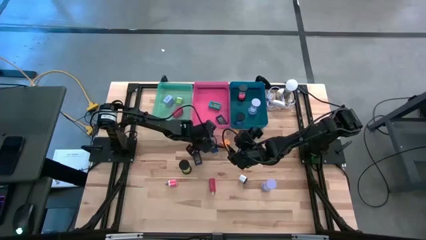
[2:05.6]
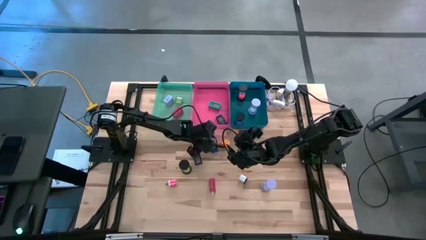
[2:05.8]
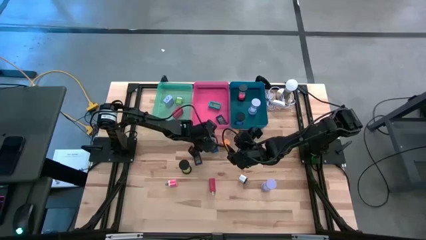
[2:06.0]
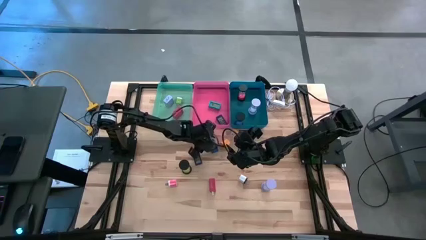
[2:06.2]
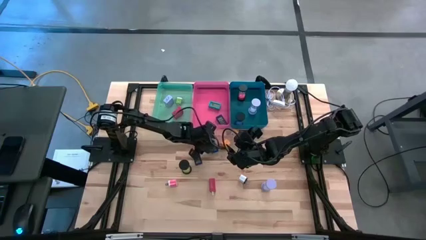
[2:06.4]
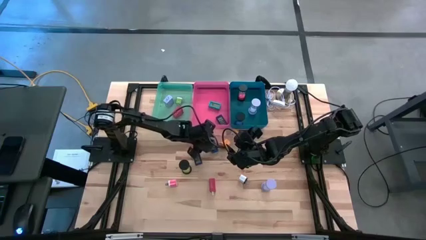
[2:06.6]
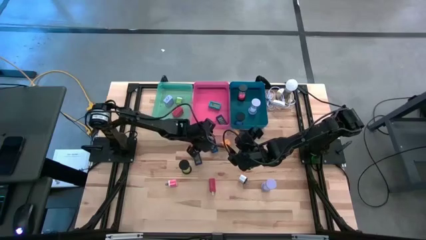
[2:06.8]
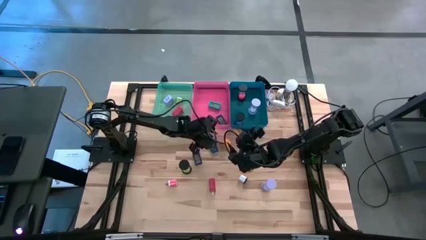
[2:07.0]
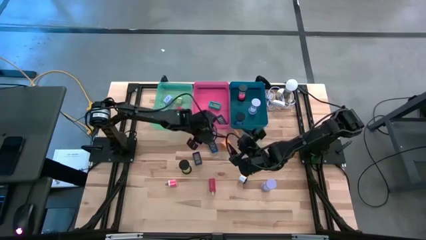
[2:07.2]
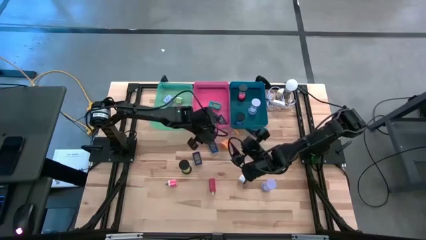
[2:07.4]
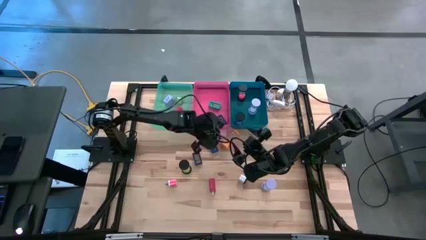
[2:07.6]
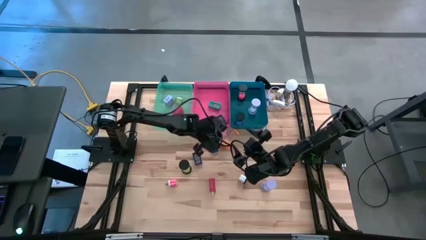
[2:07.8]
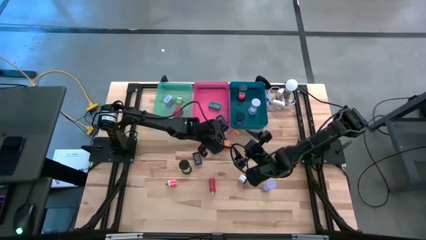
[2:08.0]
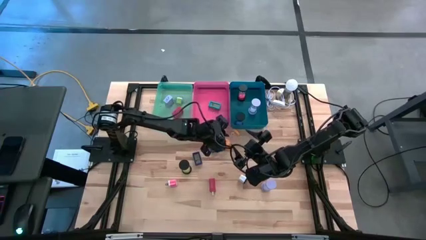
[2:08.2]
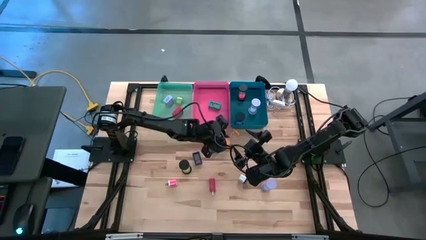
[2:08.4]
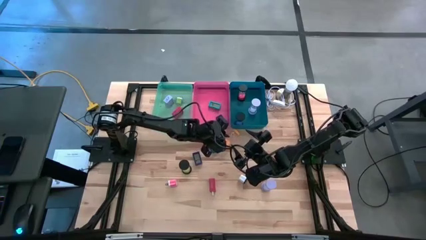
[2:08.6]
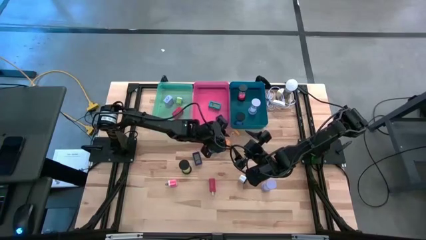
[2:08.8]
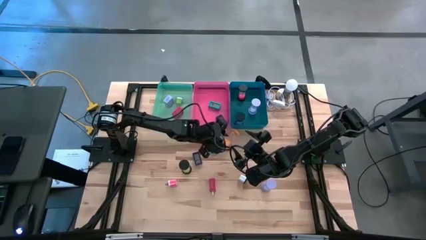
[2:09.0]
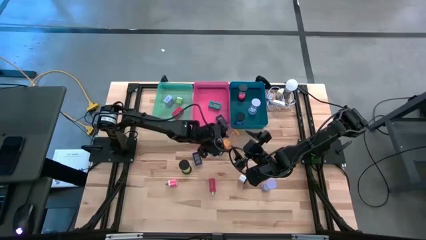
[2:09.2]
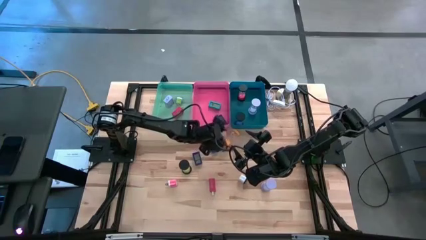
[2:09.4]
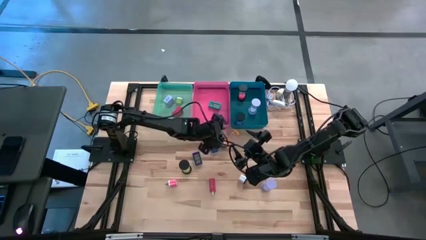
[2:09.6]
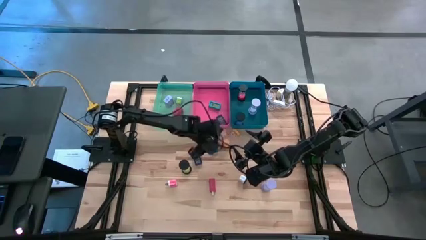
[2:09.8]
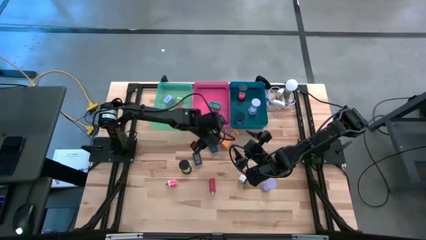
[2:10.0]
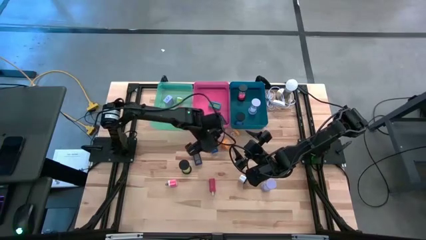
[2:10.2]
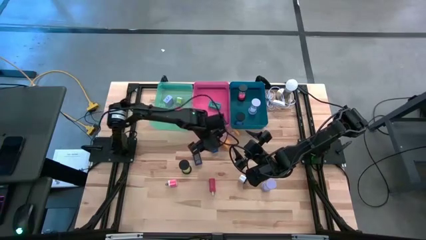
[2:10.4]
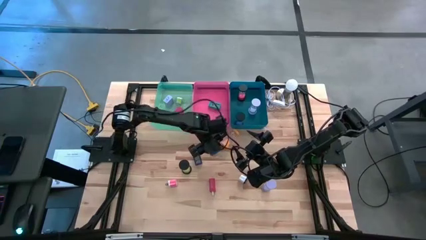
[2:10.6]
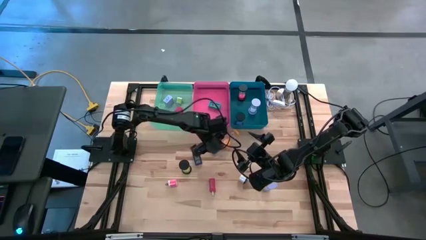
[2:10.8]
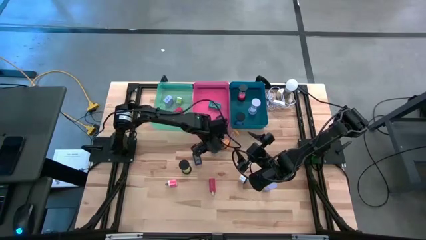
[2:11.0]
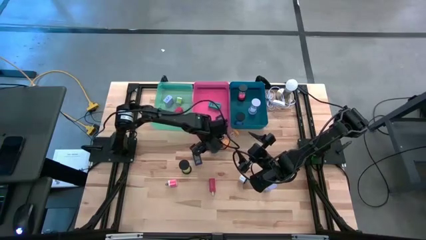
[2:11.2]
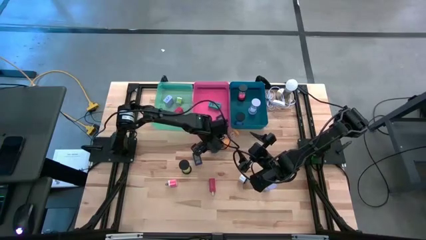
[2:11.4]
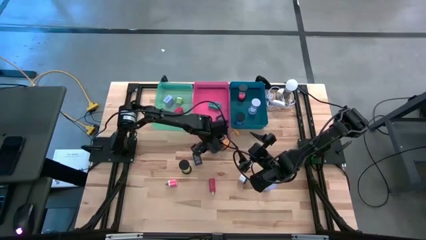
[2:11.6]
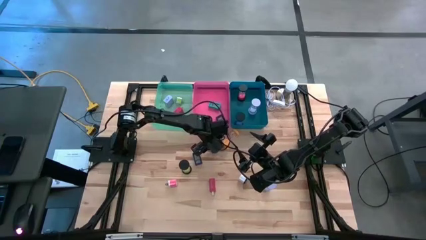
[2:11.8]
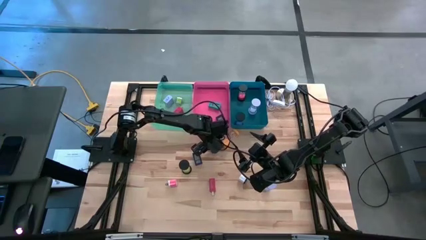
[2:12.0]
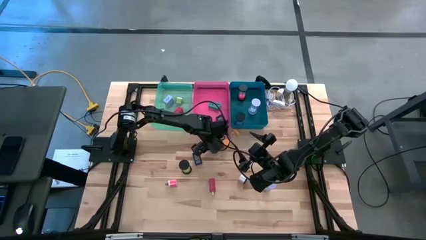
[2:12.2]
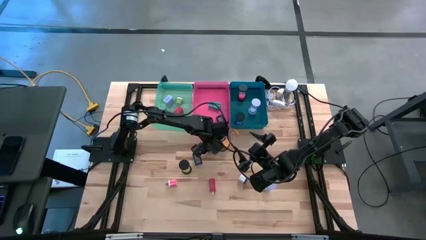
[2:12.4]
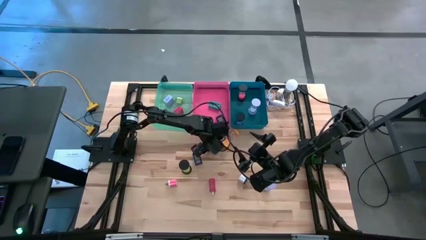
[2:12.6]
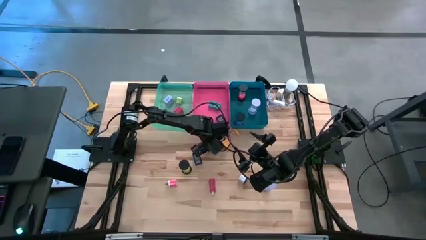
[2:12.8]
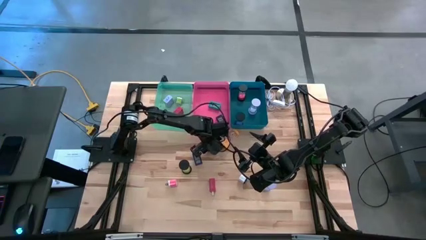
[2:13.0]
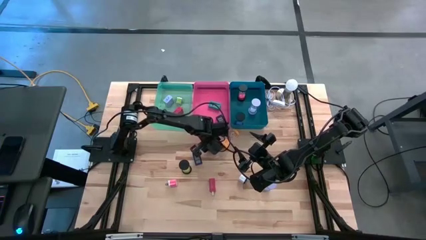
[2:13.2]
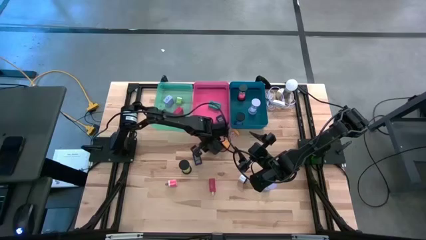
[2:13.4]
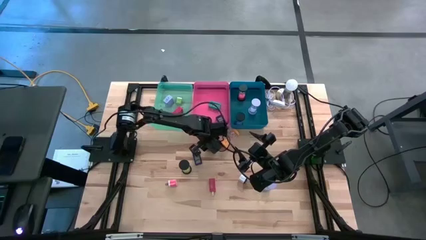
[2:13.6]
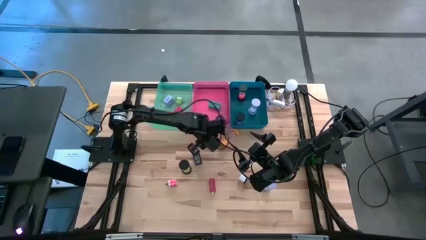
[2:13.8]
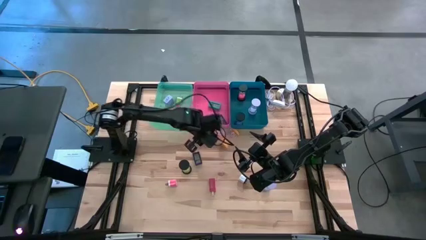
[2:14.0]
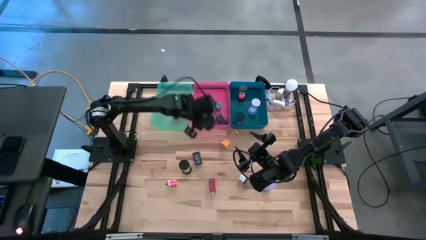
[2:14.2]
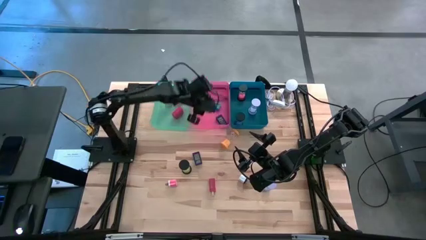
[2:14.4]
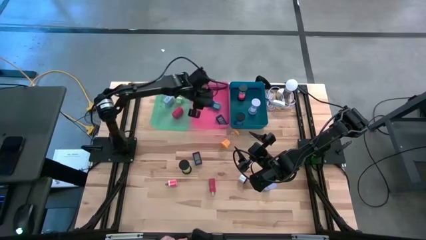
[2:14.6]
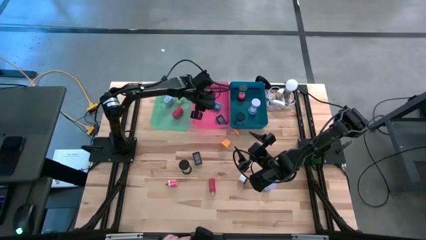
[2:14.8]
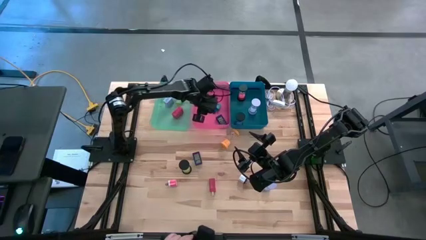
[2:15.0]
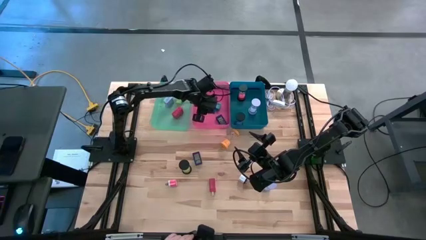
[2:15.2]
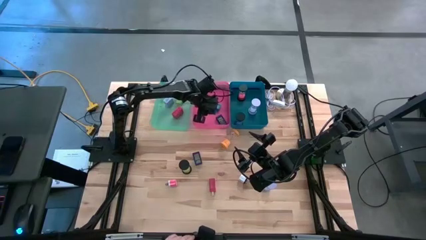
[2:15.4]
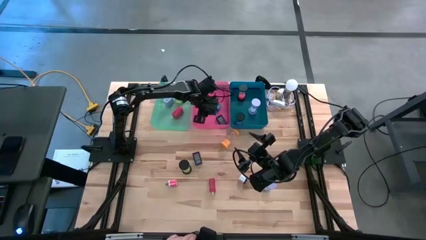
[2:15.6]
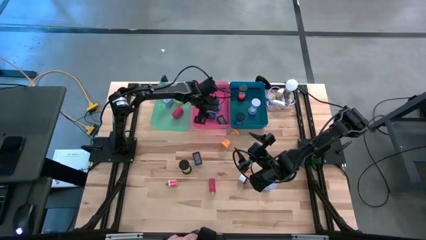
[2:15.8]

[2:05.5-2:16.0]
Task: Pick & Place Office items
Put the light blue digital clock into the pink bin

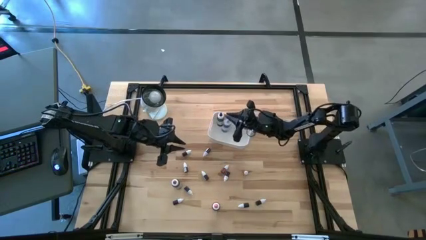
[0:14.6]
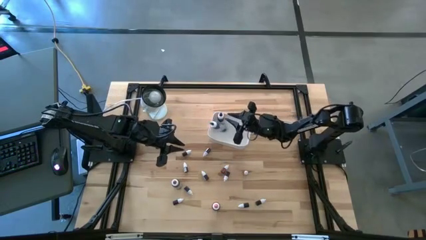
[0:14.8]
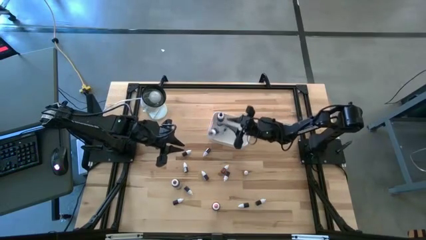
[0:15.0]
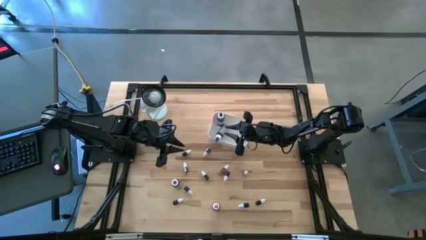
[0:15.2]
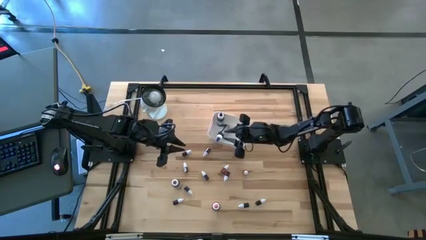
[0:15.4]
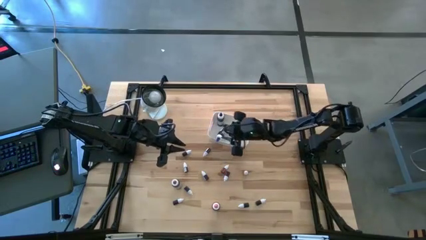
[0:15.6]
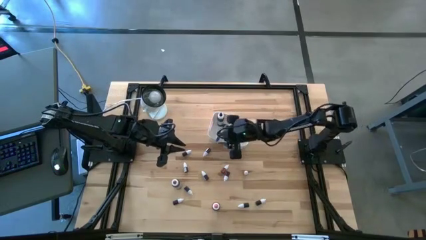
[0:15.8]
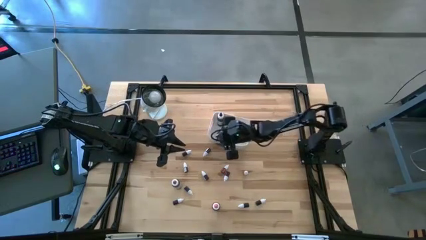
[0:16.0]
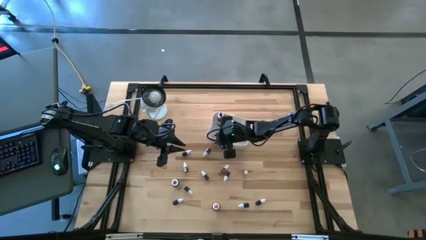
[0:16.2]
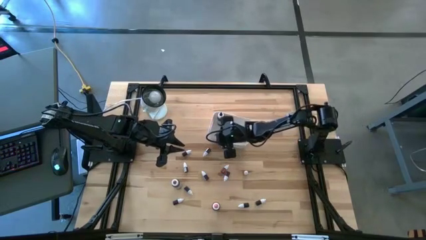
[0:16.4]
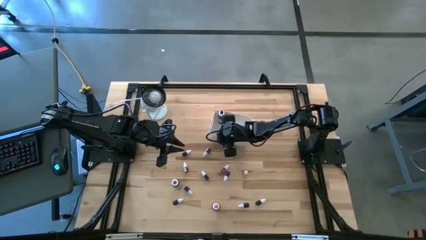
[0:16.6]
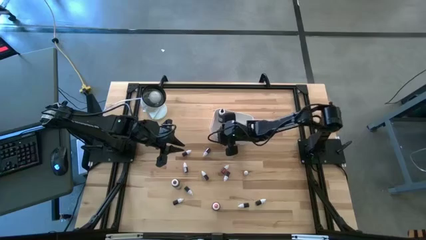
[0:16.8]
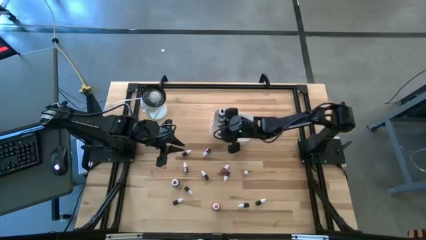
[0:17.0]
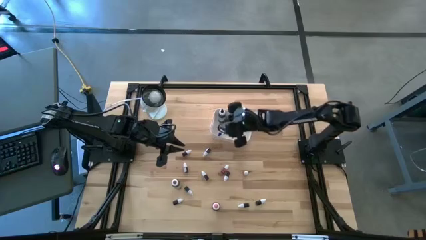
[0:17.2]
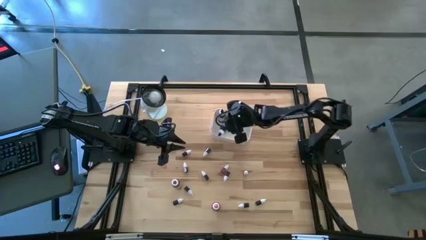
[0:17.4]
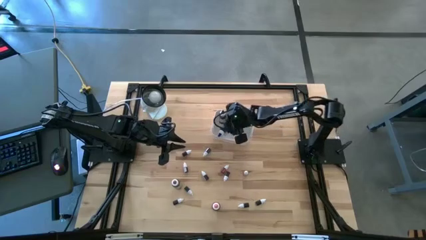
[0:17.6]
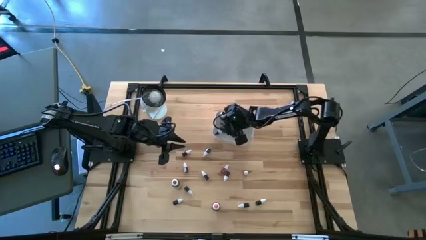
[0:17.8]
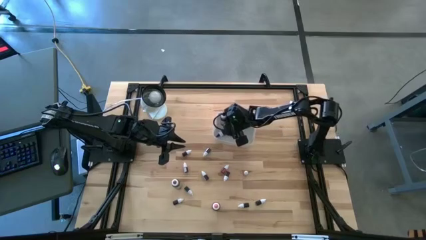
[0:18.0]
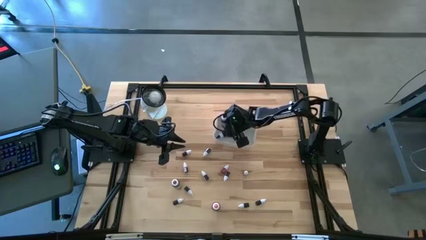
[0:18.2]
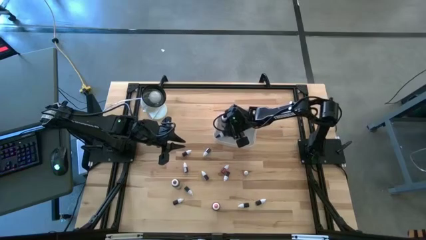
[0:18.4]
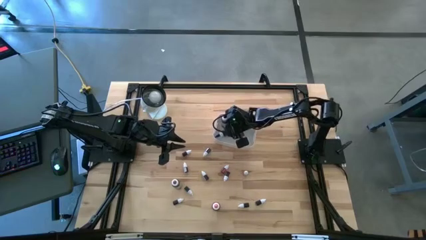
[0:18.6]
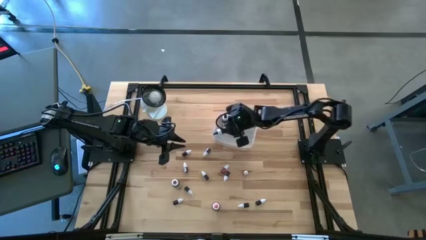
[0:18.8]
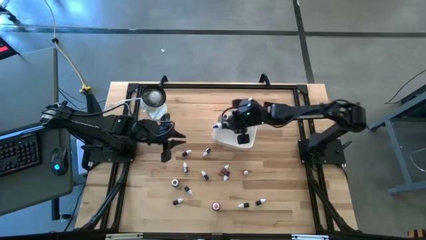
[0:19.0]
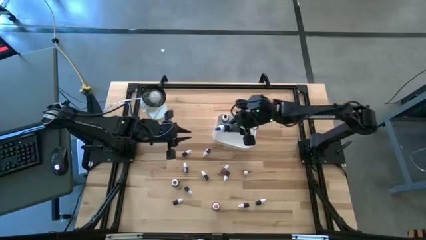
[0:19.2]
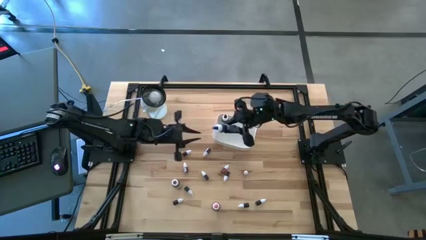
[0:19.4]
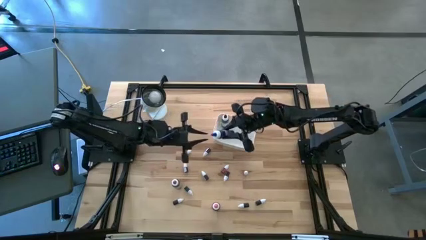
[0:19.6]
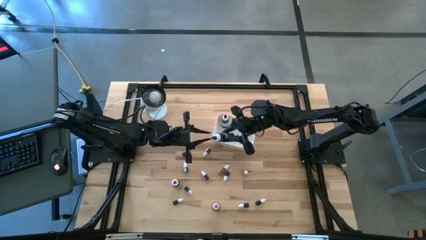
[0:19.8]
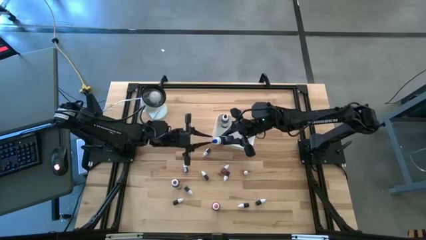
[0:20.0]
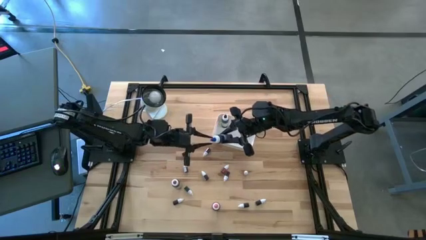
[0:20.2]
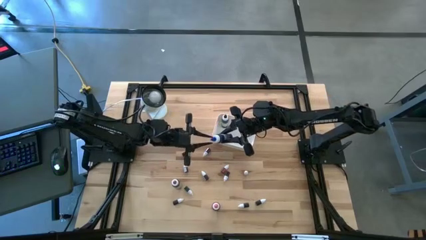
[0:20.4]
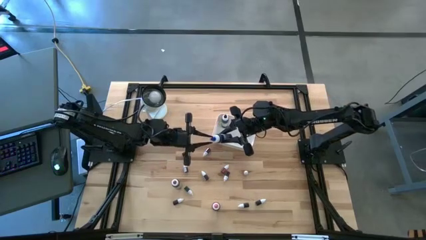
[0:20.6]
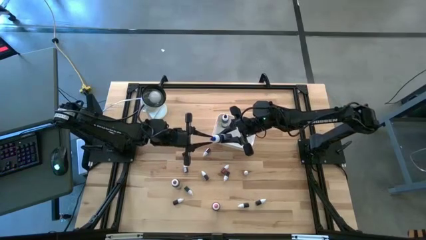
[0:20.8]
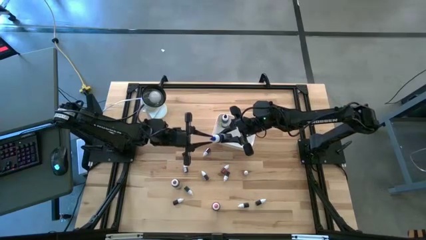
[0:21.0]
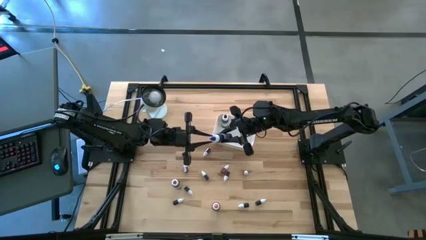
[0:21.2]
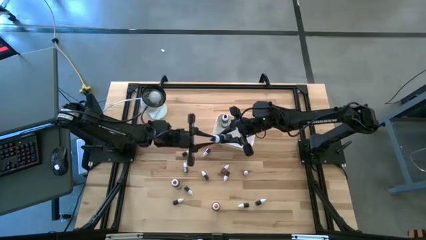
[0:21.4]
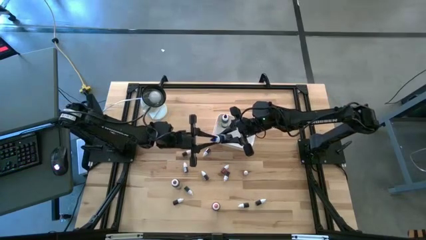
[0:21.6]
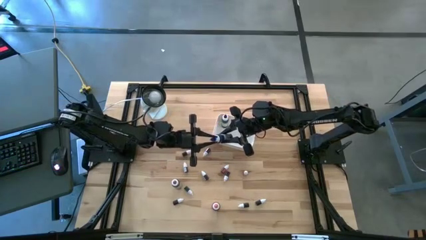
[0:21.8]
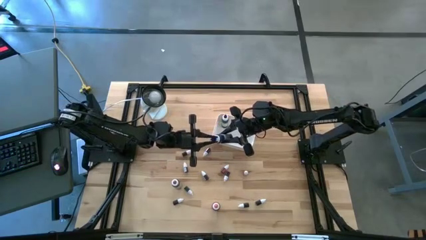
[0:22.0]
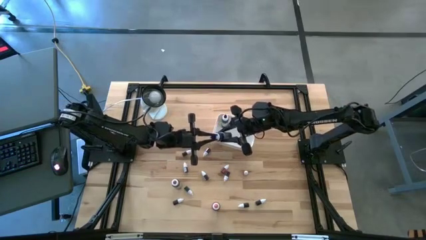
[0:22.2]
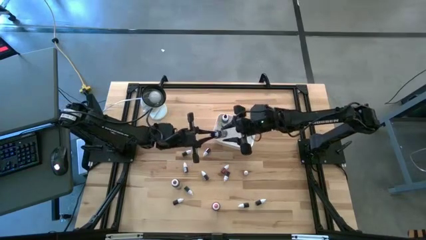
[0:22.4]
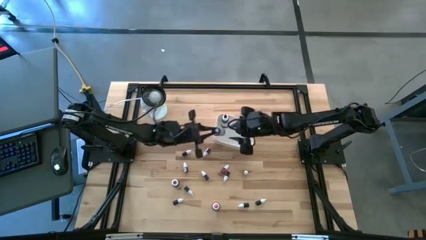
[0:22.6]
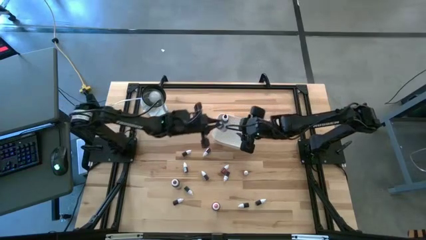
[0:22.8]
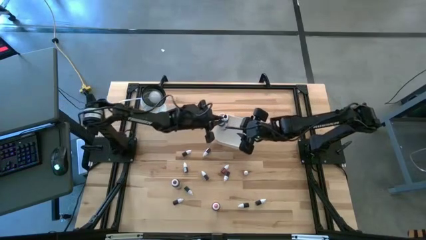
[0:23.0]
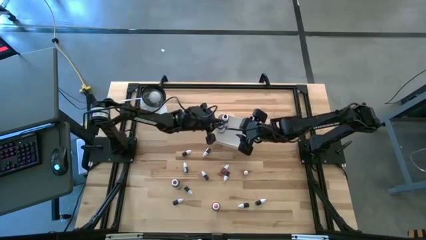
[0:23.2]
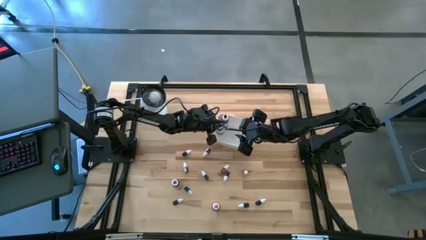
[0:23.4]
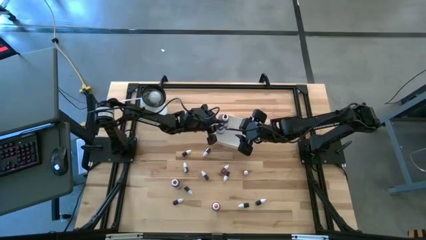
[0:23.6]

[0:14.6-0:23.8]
Task: Pick & Place food coloring
Put the big blue food coloring bottle into the white bin
